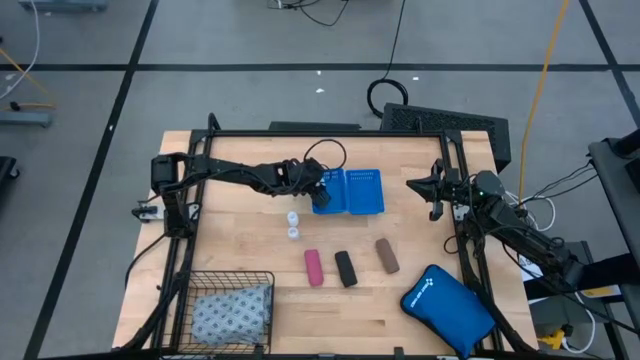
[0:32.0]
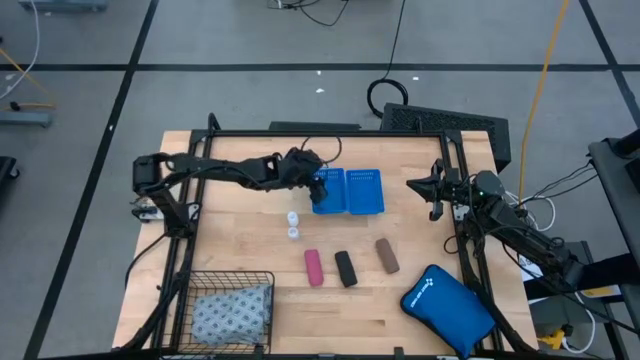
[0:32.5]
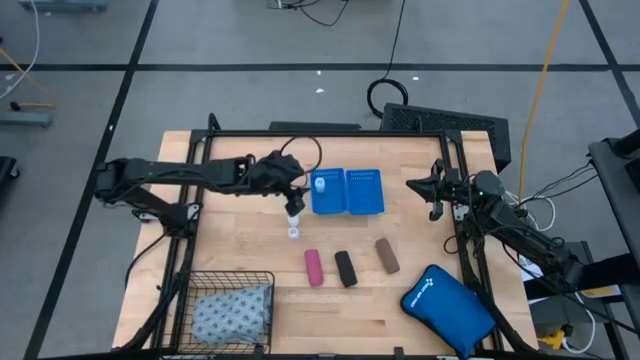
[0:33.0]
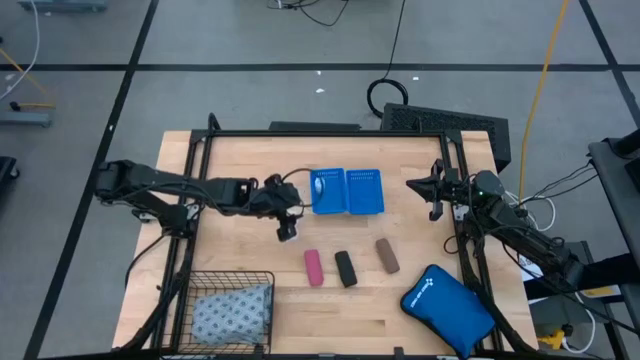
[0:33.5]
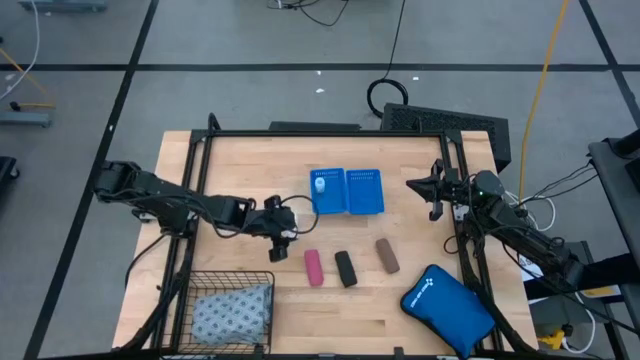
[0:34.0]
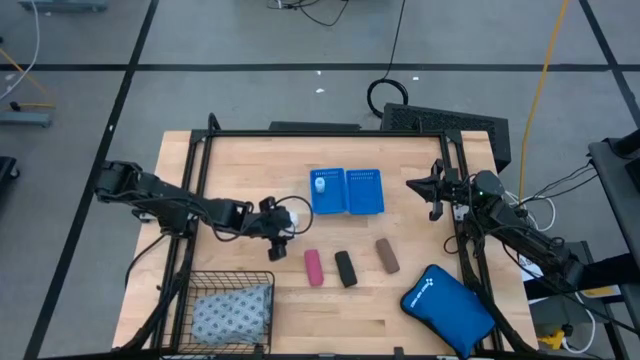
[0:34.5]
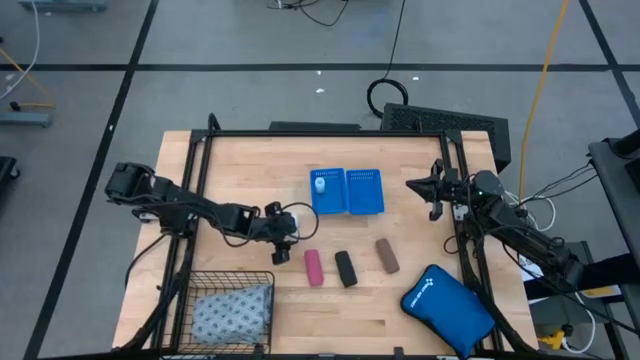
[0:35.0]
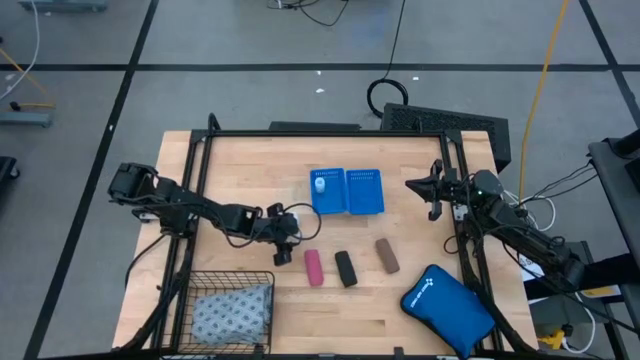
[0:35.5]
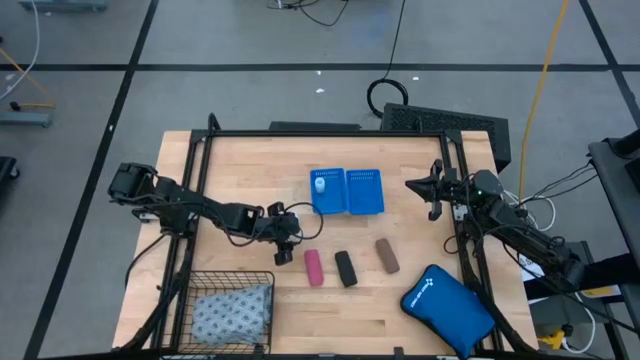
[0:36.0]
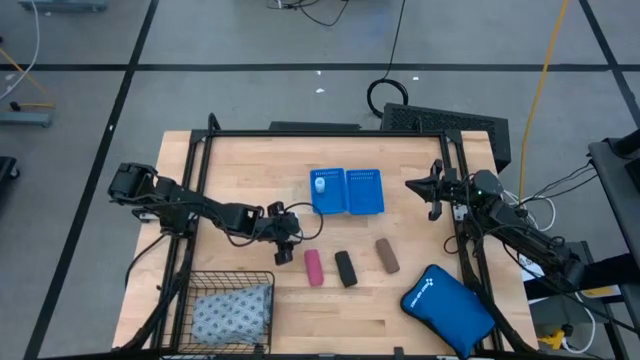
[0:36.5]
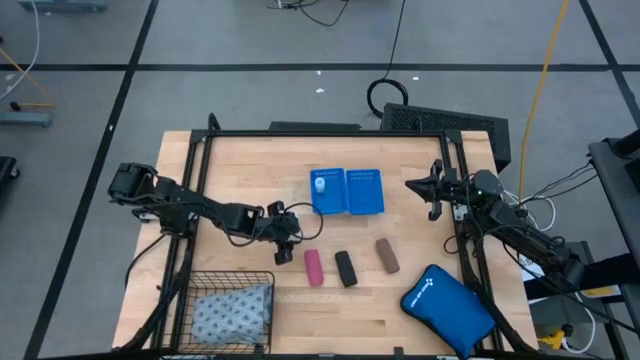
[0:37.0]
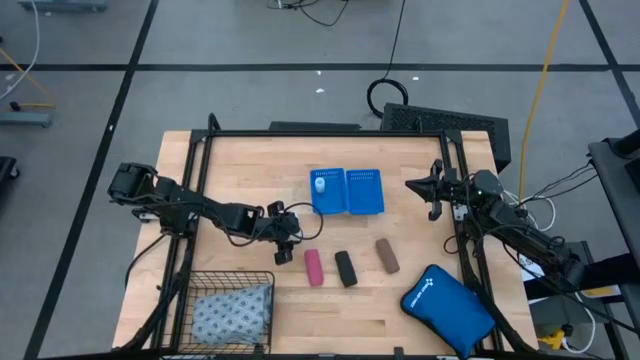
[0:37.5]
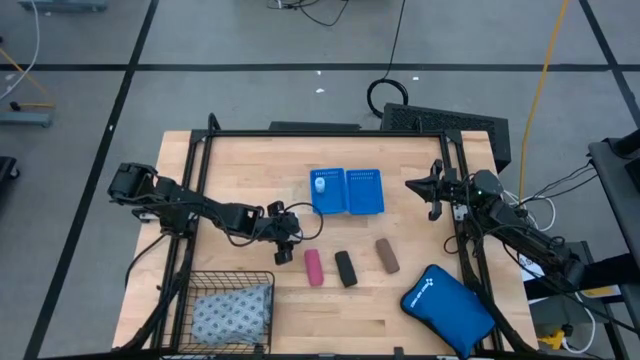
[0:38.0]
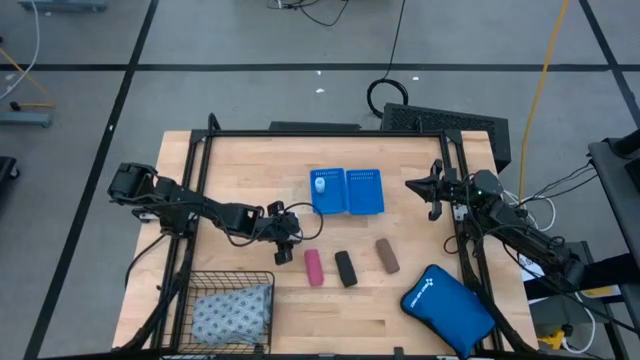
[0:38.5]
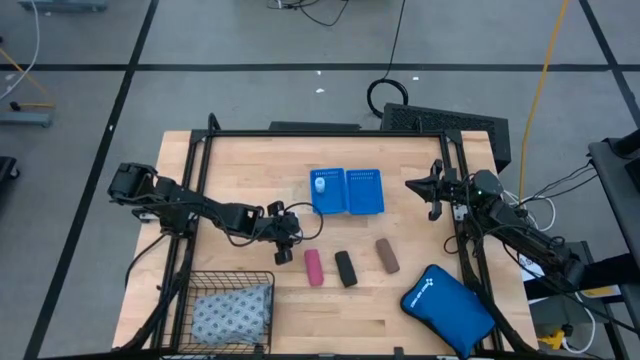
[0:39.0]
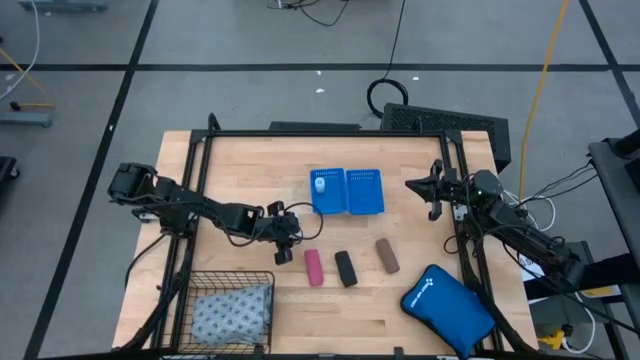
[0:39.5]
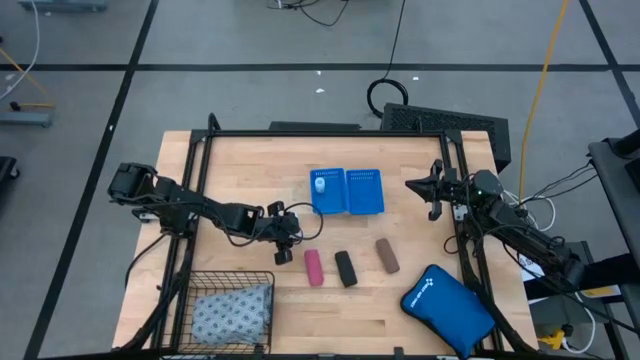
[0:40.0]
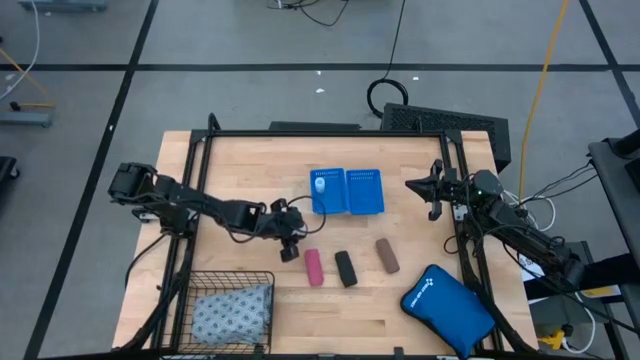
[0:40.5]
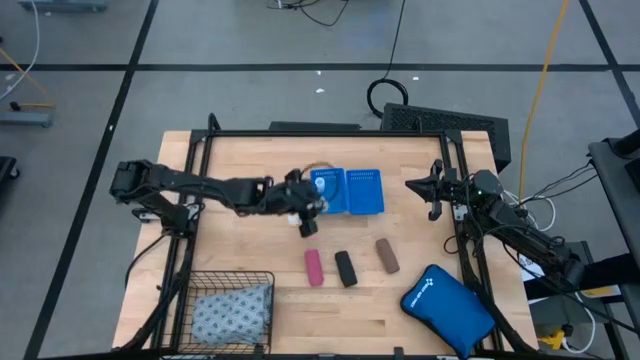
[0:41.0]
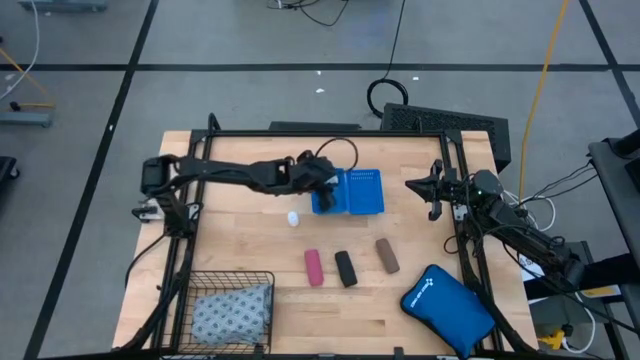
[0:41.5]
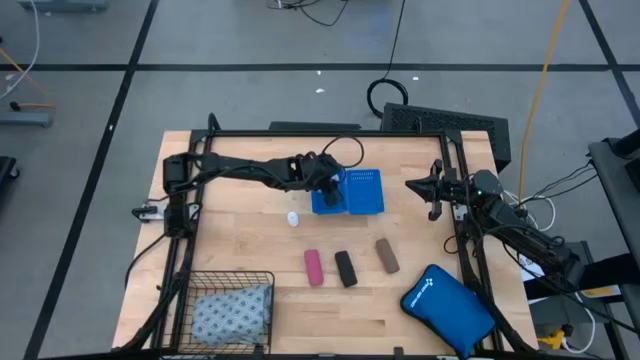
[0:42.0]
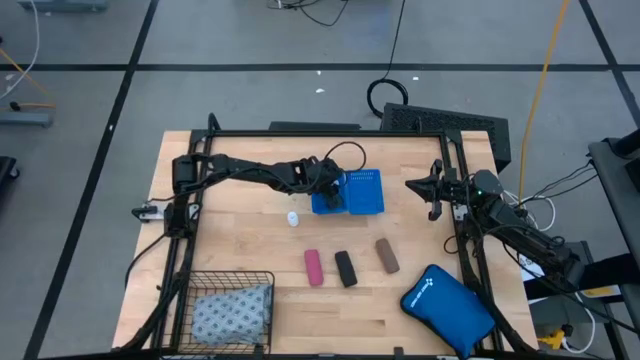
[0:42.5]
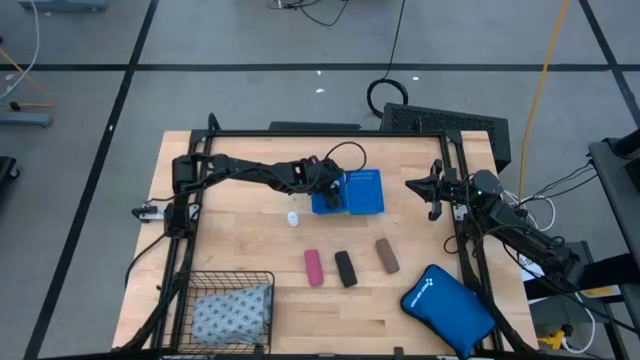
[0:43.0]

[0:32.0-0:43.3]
Task: Pick & place medical supplies in basket/bin
Put the bottom transparent pill bottle into the left blue bin

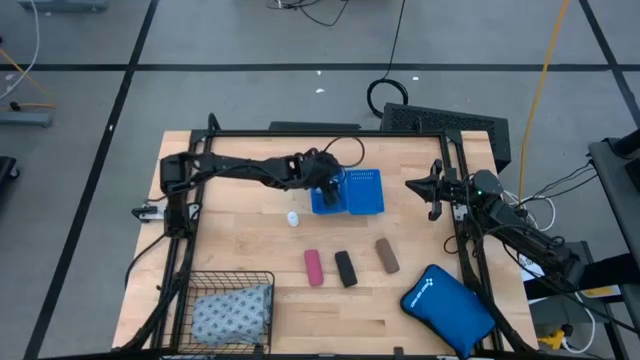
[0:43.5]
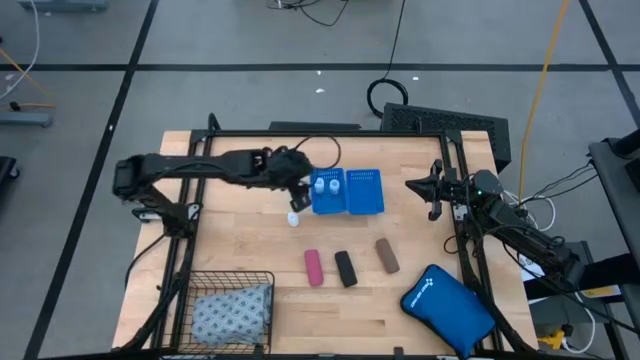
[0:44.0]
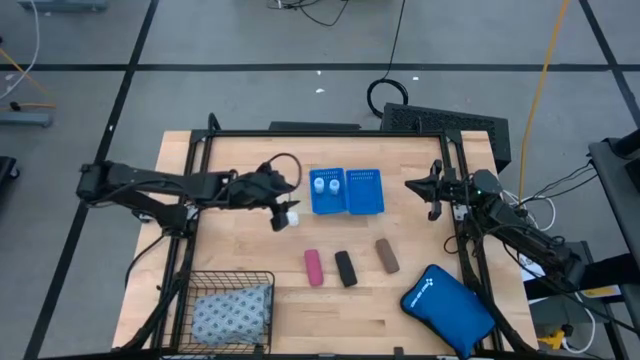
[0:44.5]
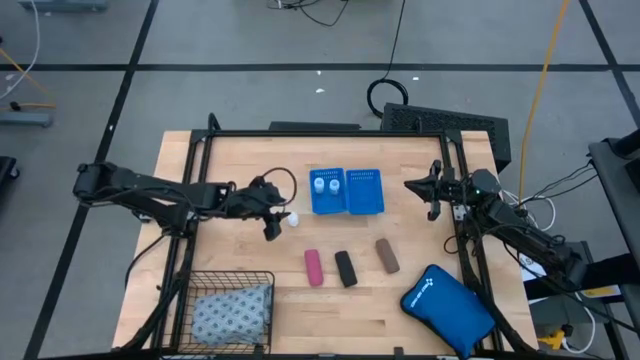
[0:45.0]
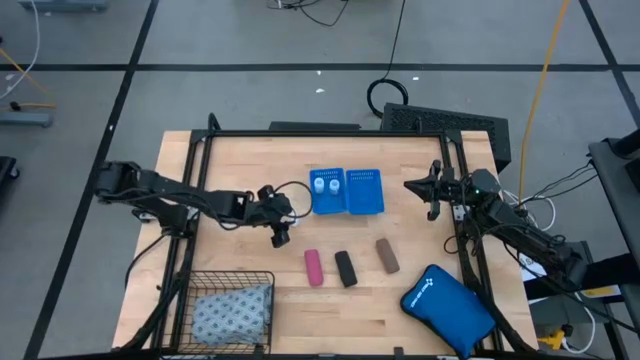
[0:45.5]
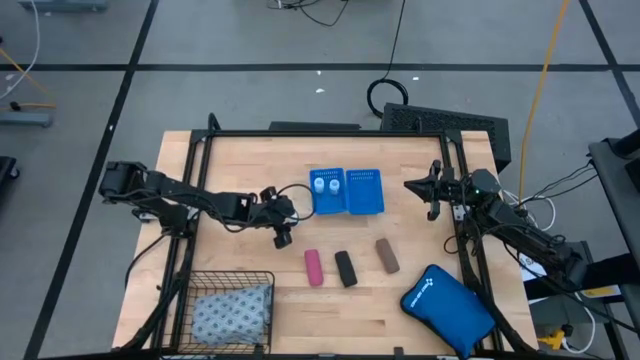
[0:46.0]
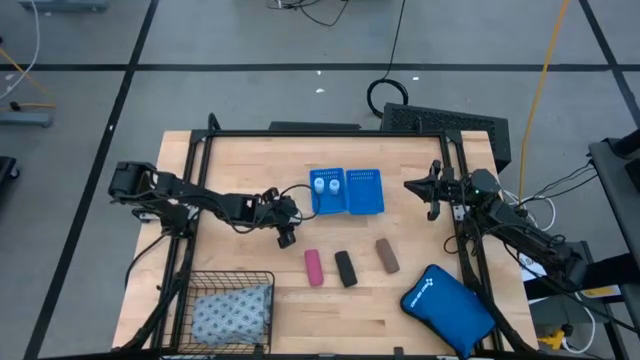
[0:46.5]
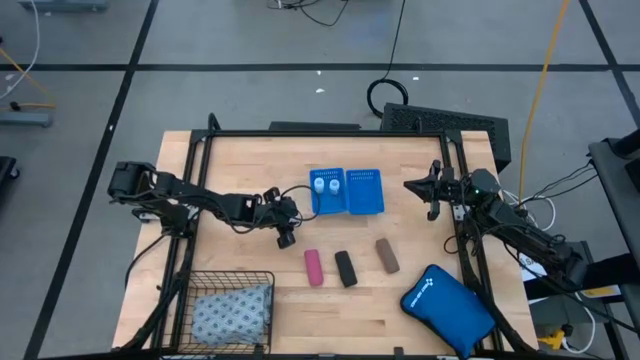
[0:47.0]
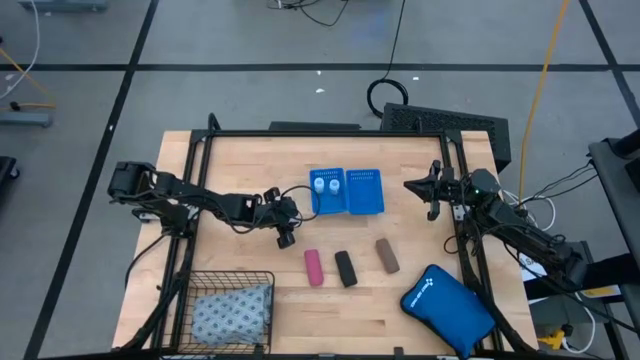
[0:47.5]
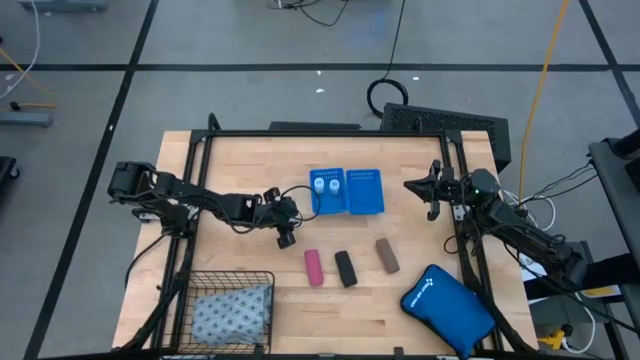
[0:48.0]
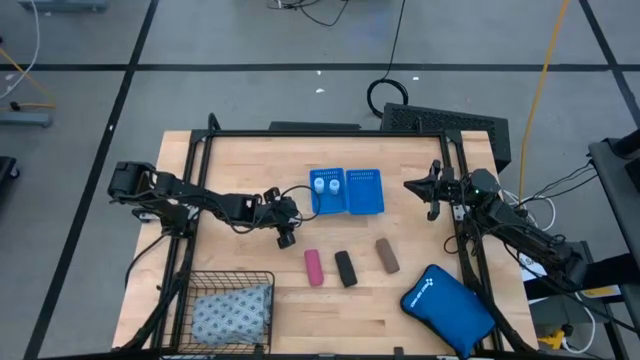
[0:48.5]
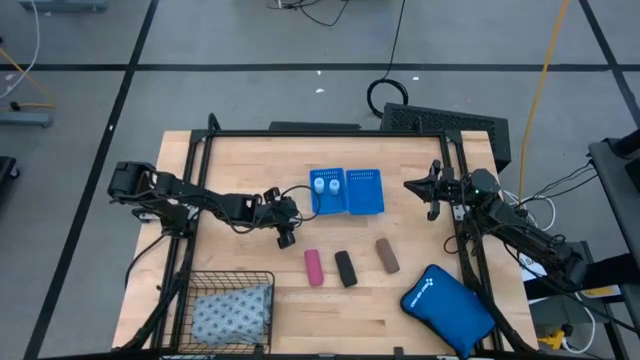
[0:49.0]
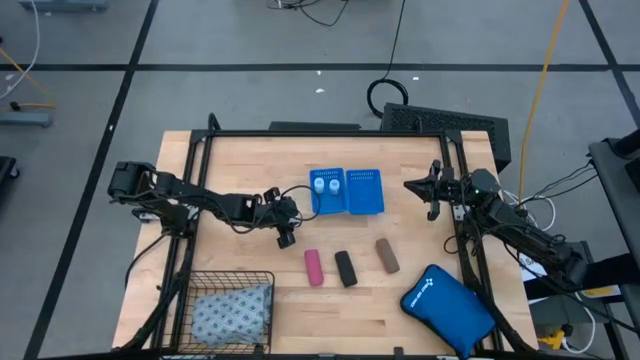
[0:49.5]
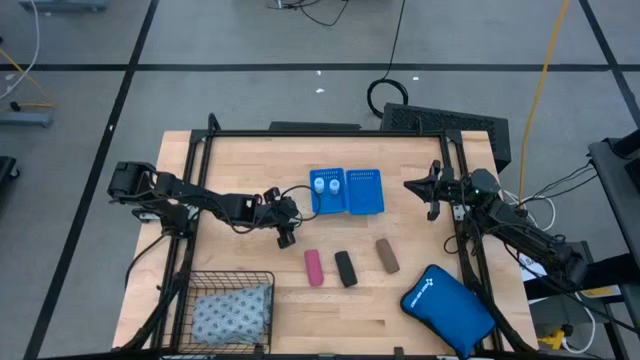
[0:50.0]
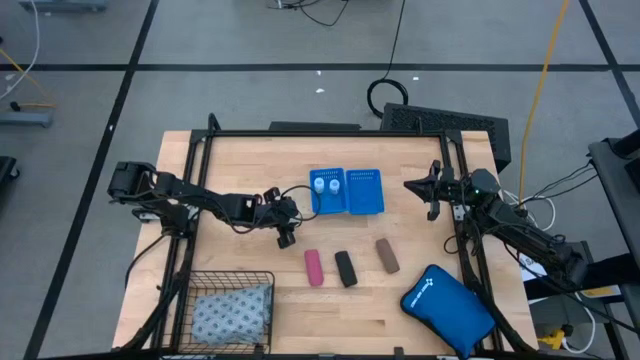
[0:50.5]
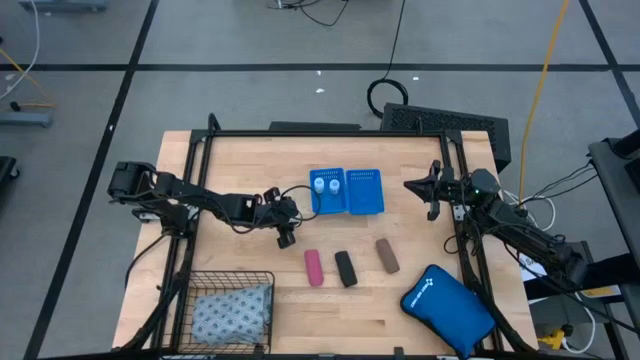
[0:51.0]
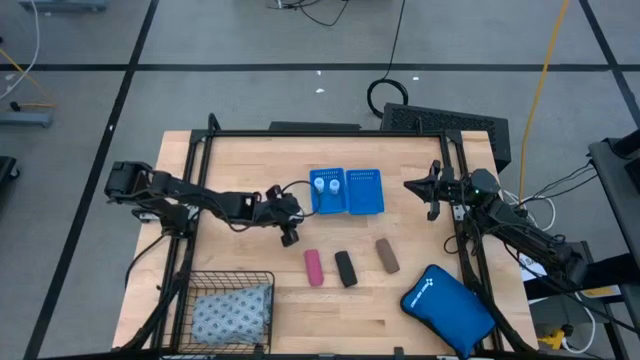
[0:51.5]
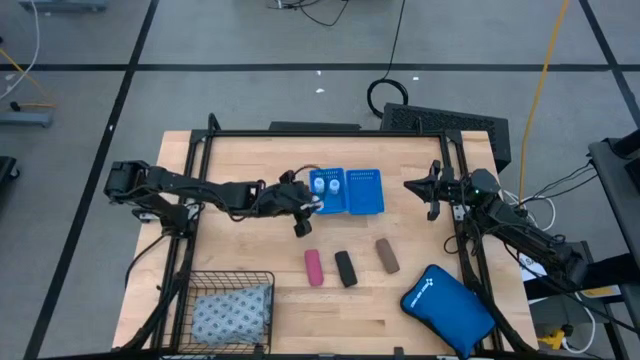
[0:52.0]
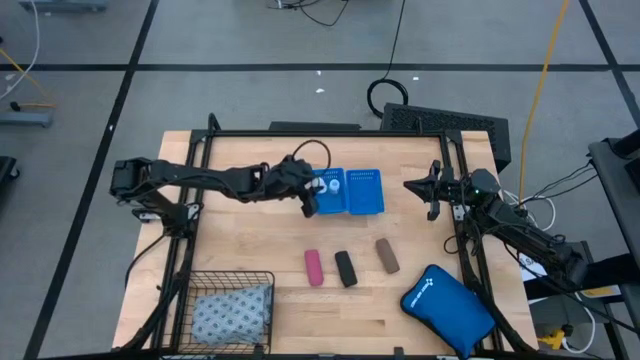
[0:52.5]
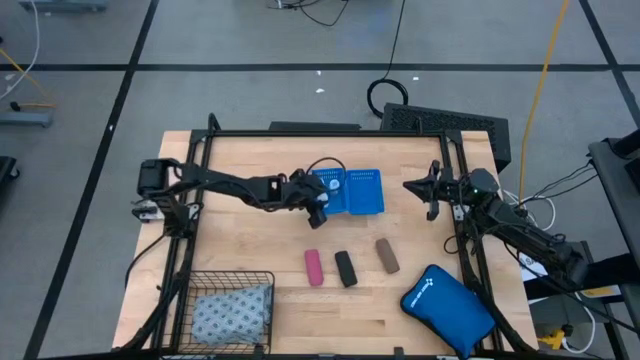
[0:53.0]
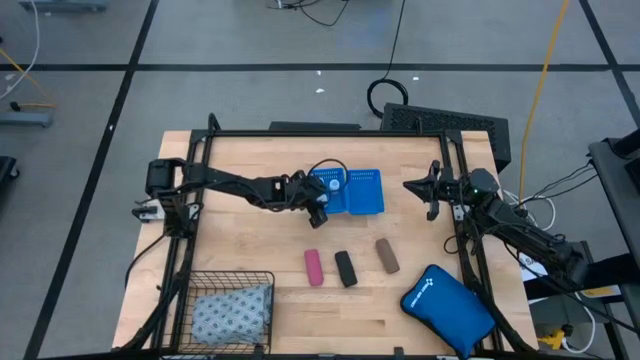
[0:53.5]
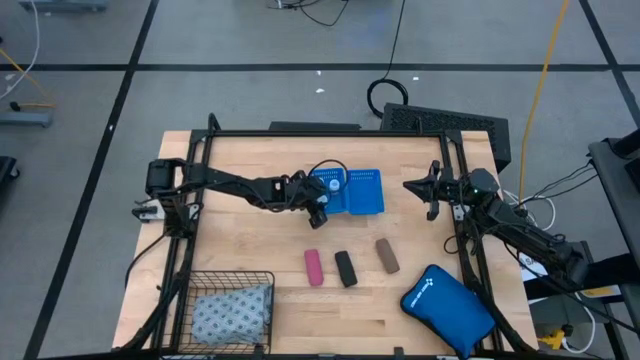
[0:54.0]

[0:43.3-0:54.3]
Put the transparent pill bottle into the left blue bin
